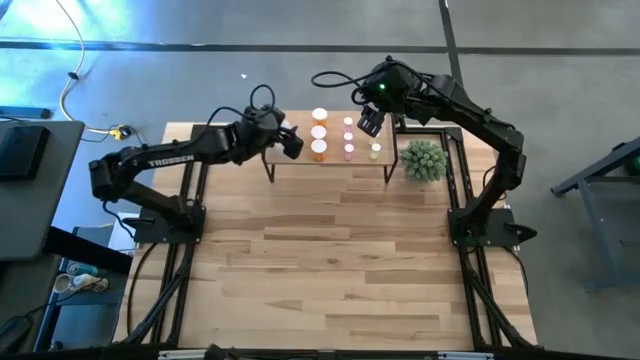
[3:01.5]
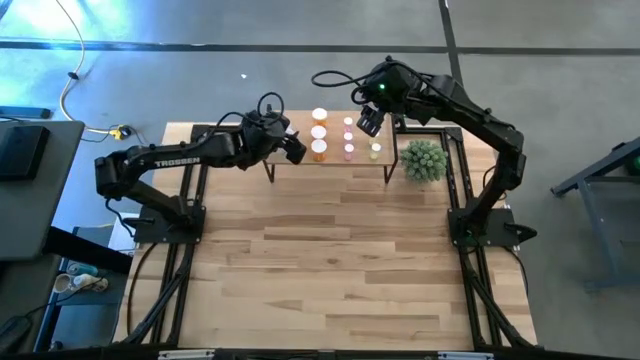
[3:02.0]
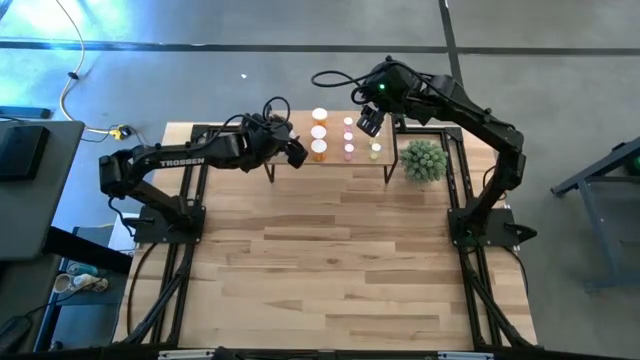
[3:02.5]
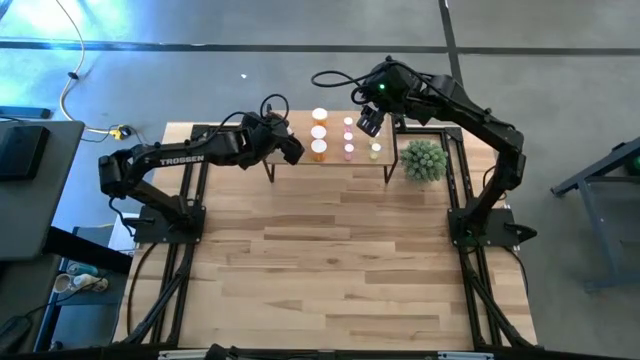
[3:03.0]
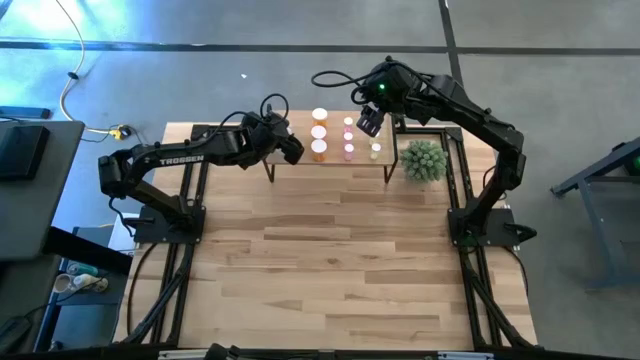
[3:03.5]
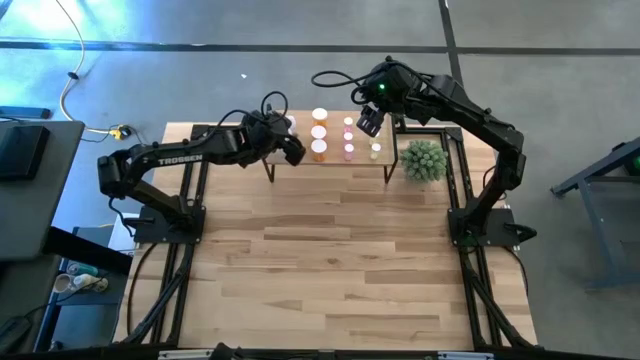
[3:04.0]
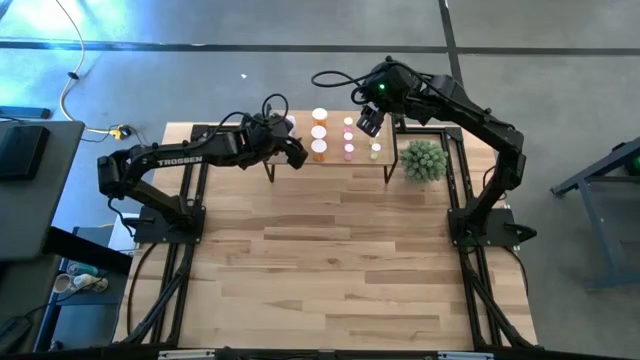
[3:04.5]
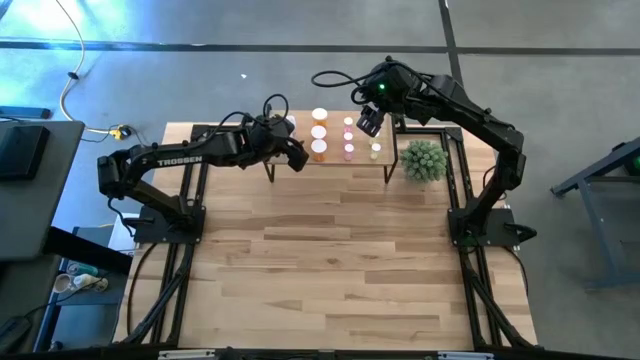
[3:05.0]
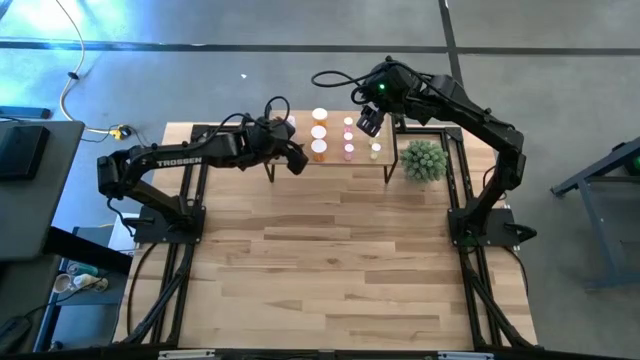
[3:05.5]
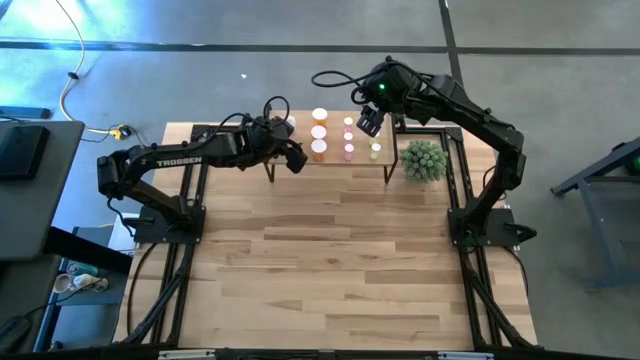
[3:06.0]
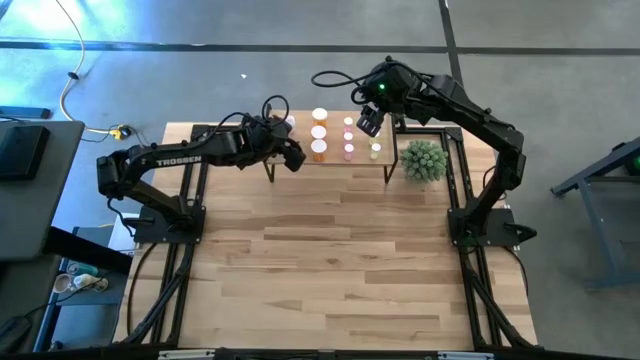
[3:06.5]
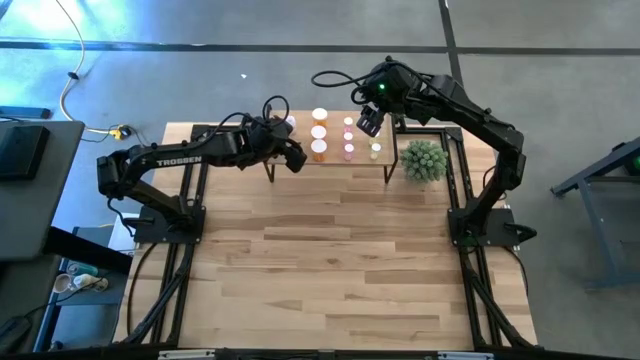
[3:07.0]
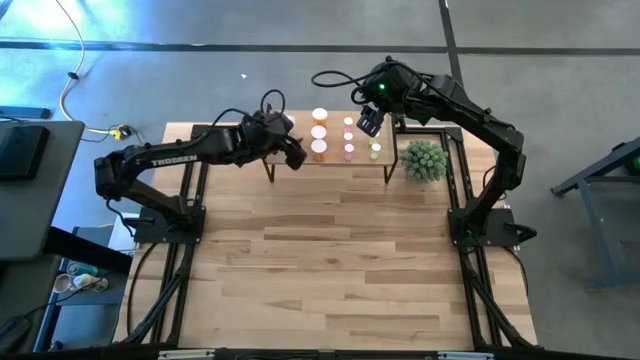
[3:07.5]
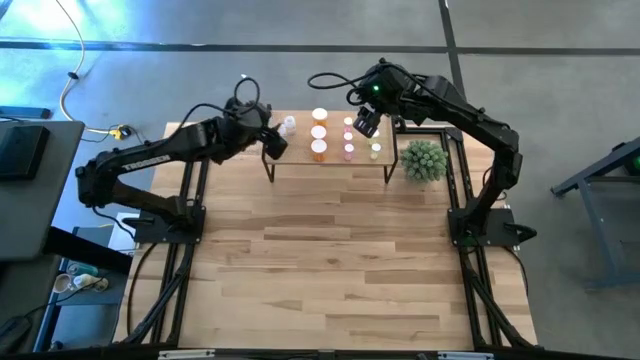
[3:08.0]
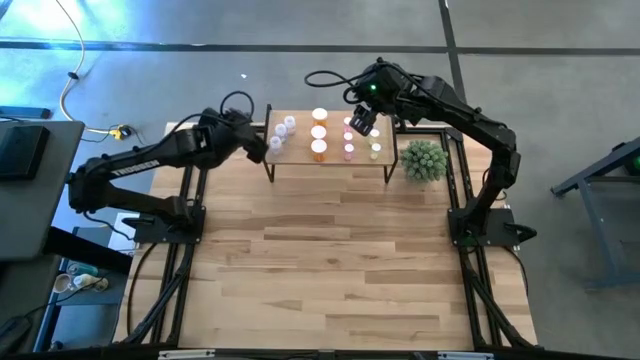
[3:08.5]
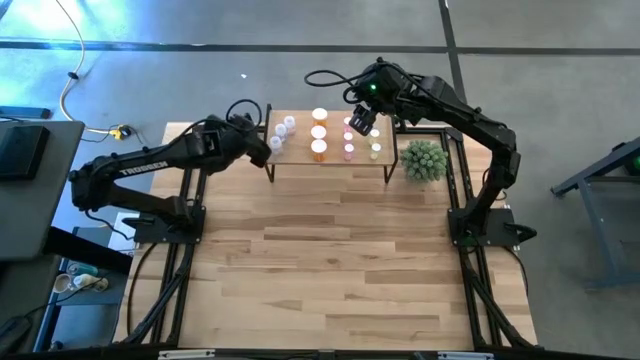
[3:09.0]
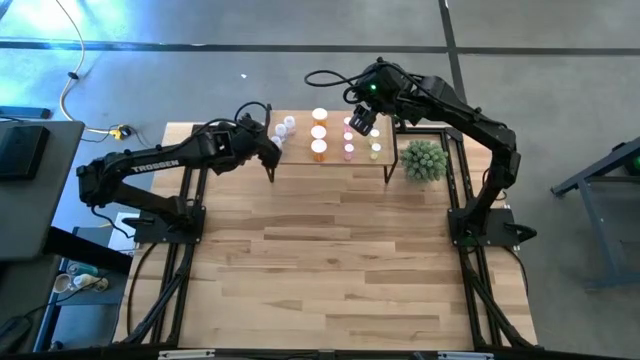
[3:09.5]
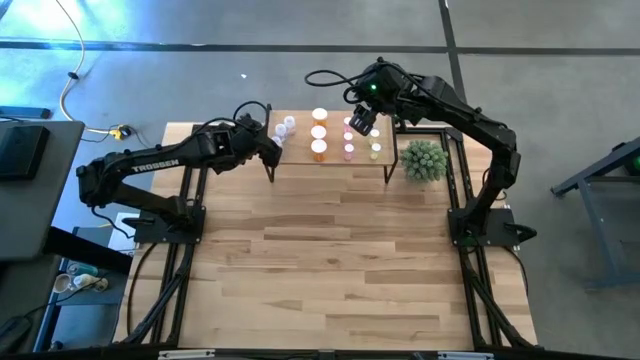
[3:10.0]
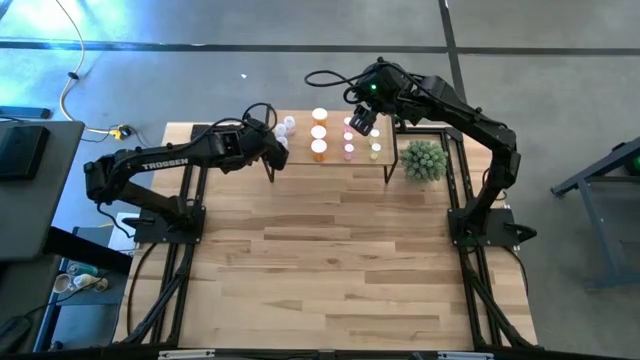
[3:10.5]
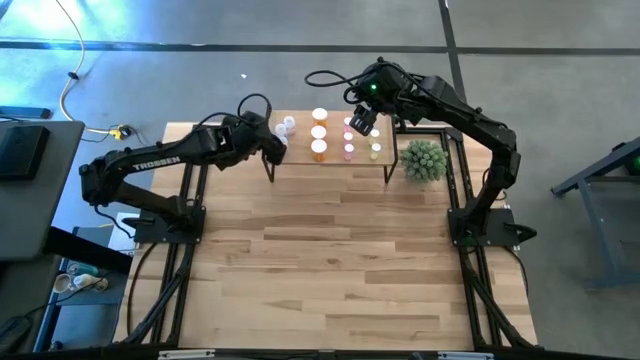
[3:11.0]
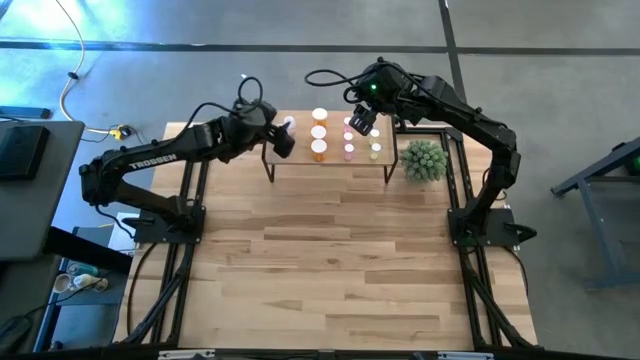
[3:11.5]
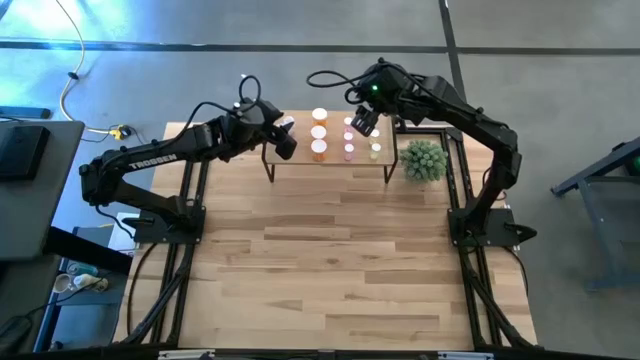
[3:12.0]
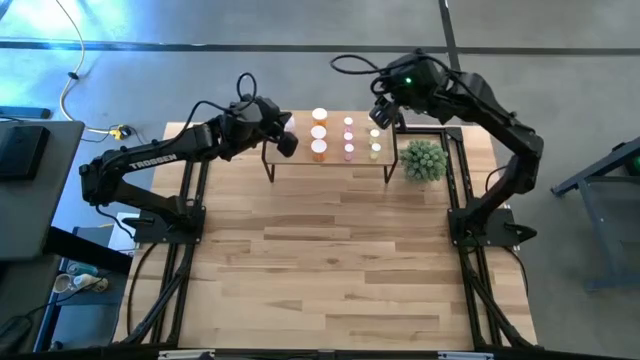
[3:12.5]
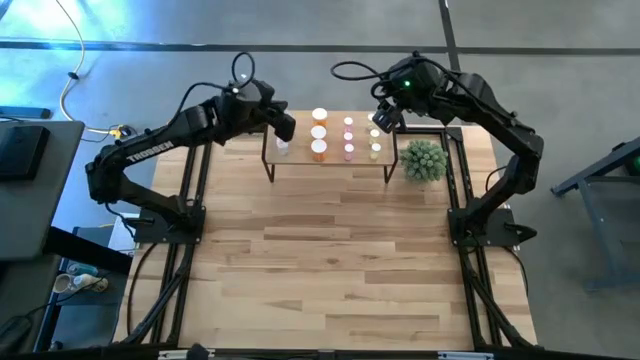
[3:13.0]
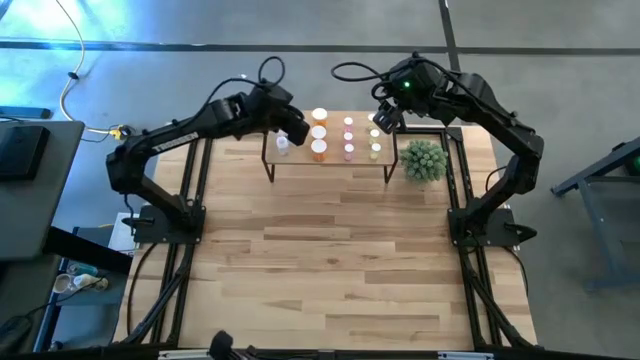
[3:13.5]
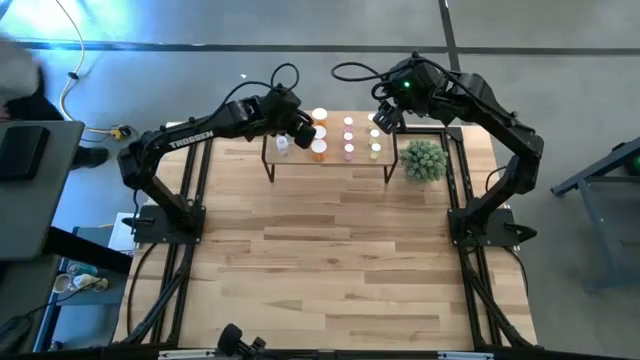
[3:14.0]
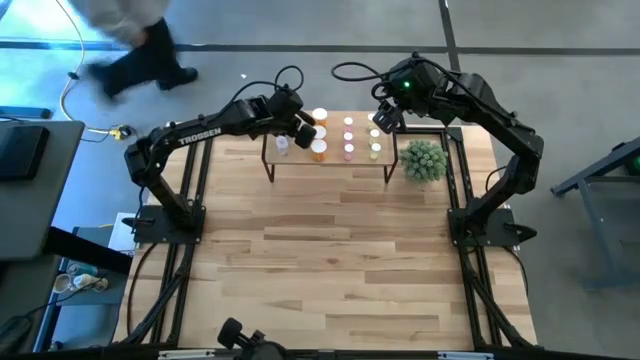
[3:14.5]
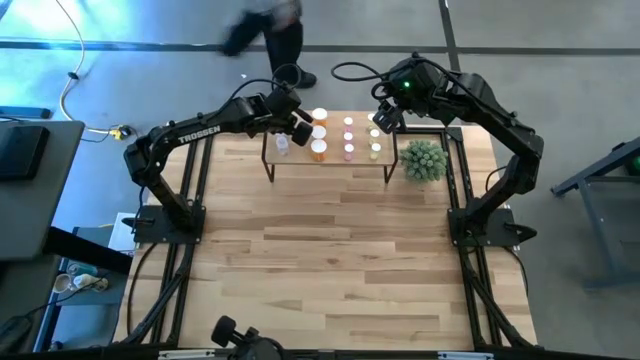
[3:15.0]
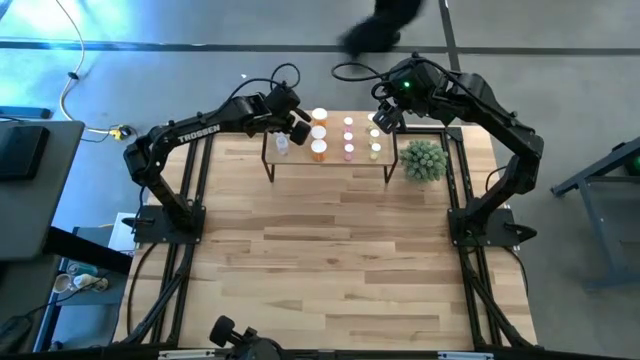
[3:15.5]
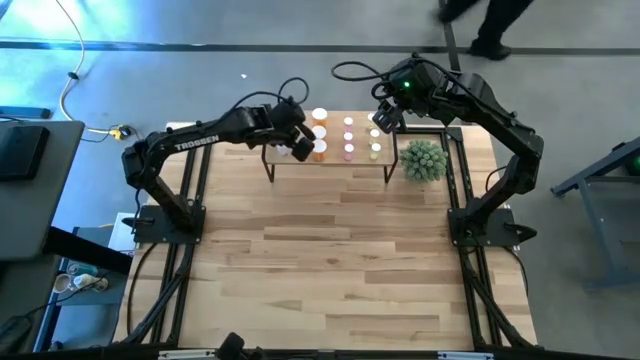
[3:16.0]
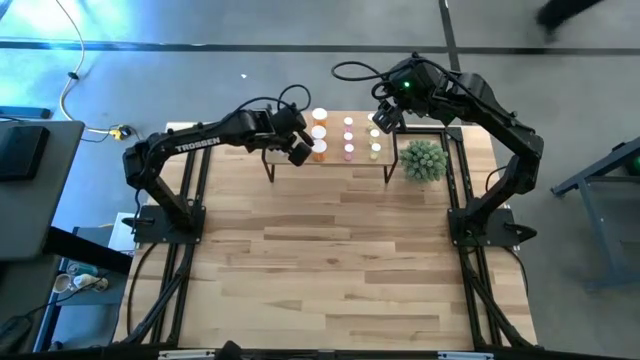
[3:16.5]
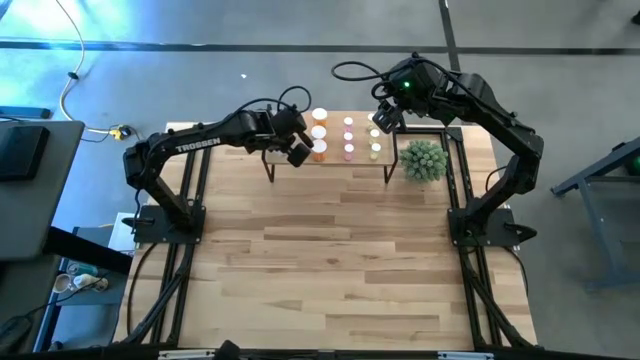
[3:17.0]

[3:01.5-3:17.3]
Task: Pick and place medicine bottles onto shelf by color
Adjust the colored pill bottles on the shelf

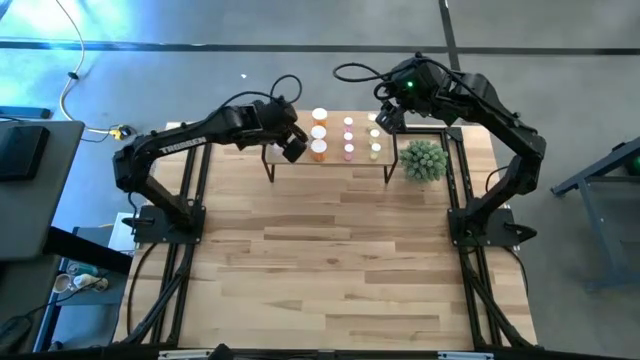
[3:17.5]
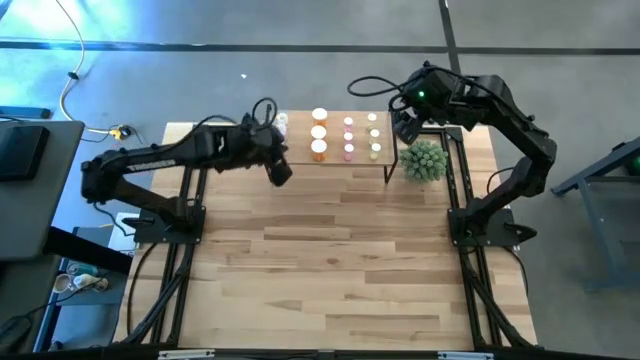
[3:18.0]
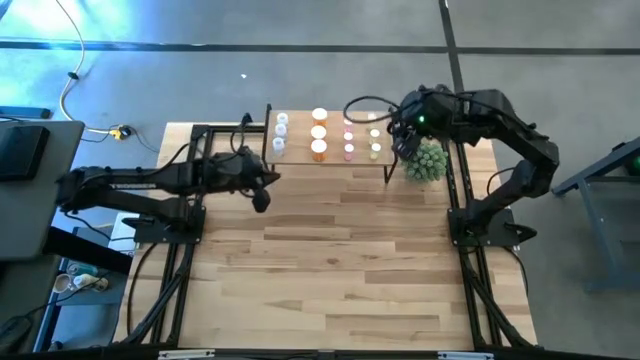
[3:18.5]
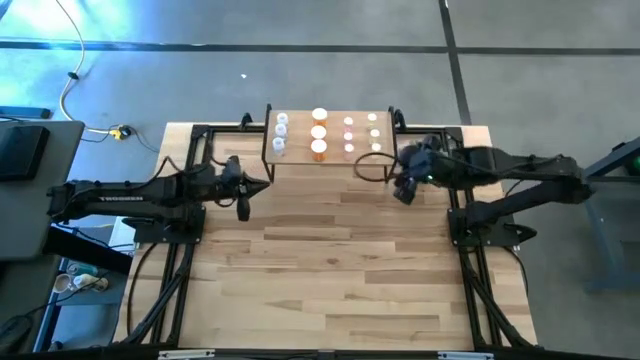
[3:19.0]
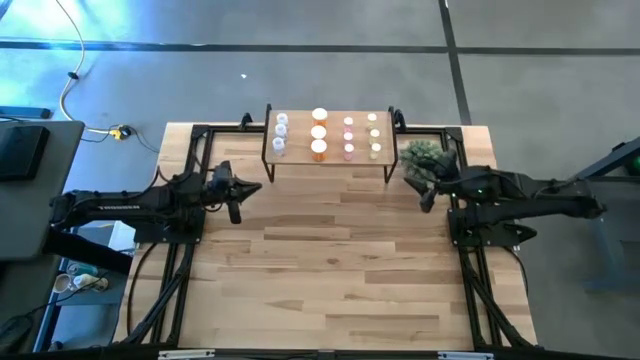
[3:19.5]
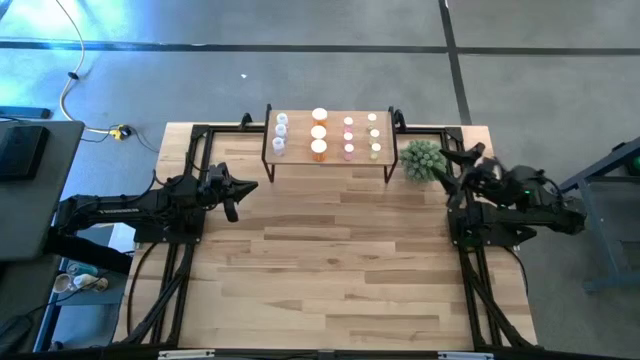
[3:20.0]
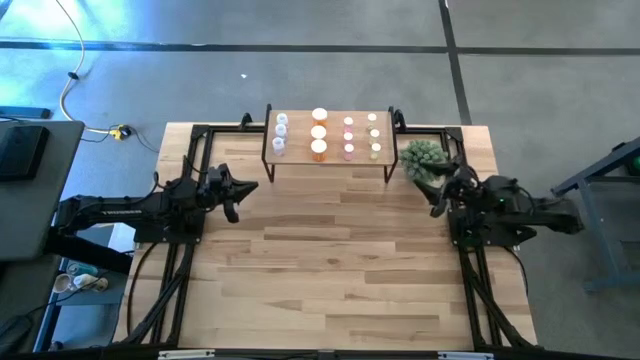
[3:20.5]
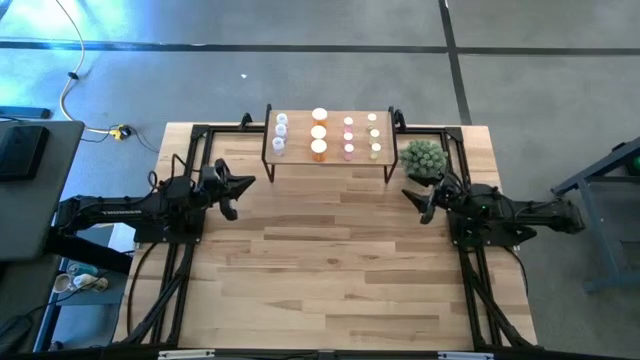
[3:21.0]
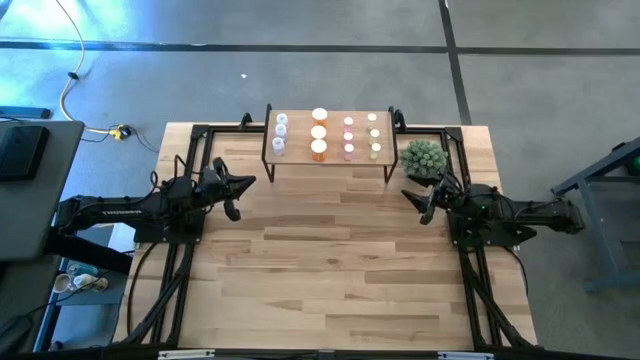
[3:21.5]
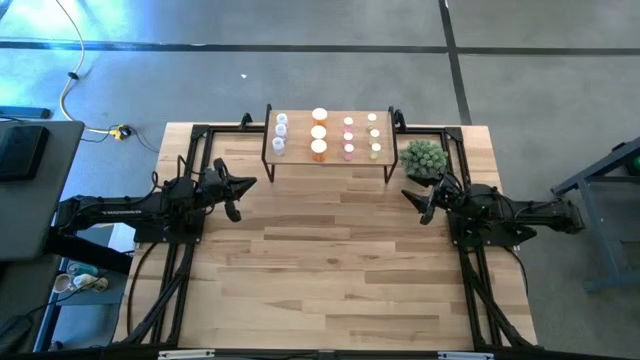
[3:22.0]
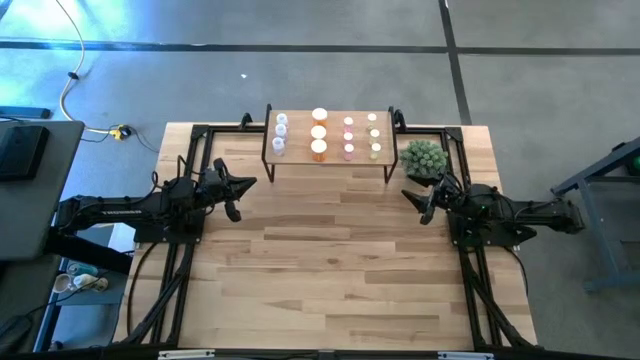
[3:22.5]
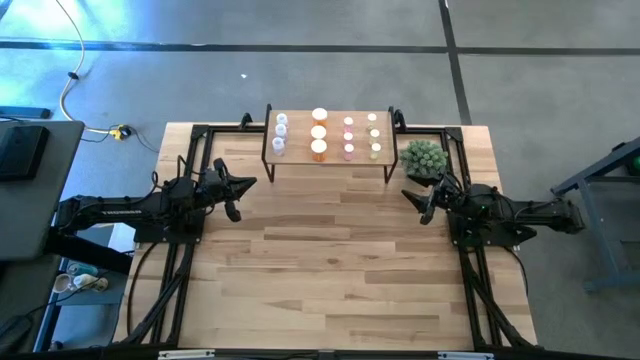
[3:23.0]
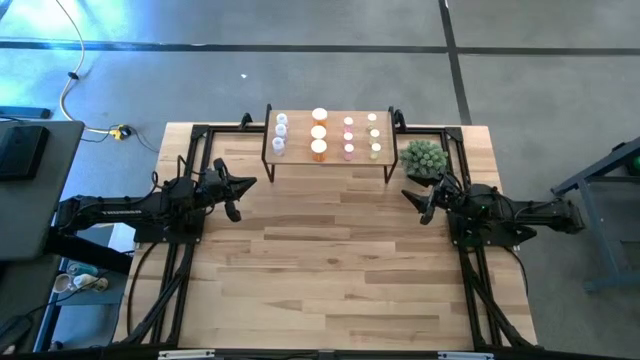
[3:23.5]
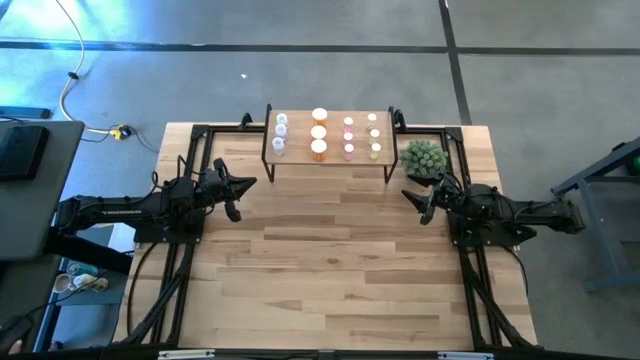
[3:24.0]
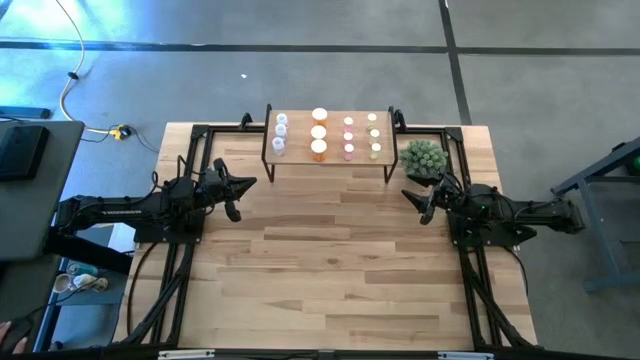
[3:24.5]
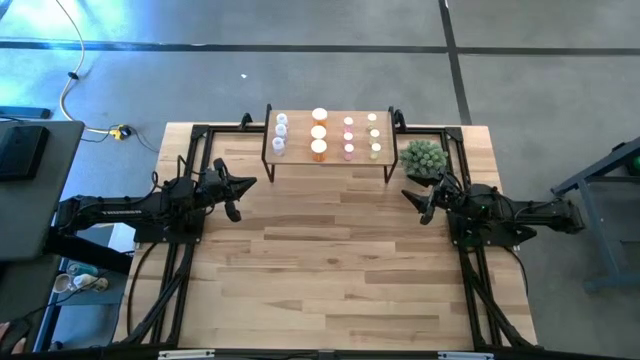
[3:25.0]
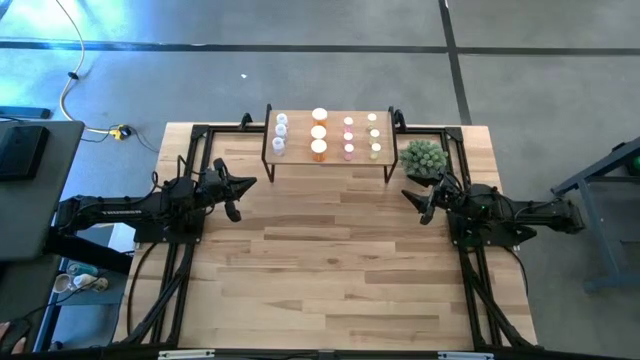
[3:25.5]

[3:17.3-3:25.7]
Return to Home Position
